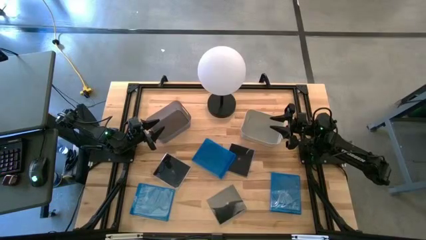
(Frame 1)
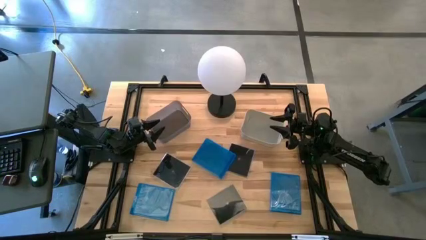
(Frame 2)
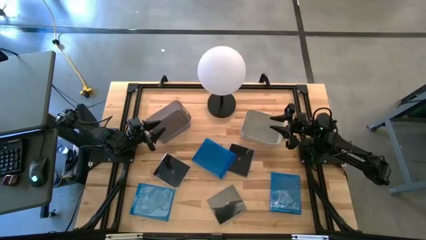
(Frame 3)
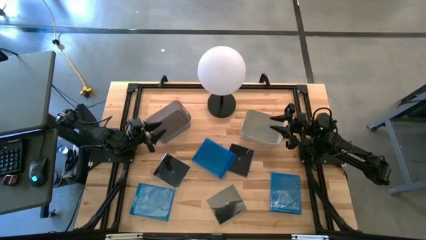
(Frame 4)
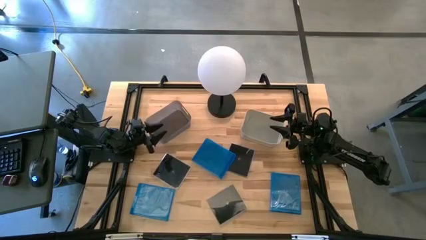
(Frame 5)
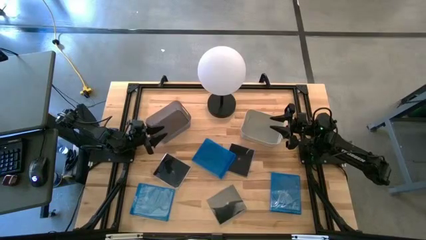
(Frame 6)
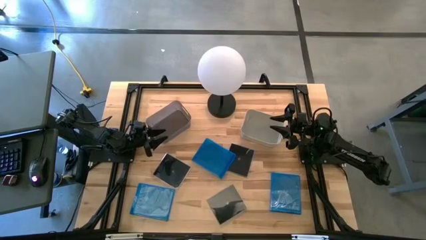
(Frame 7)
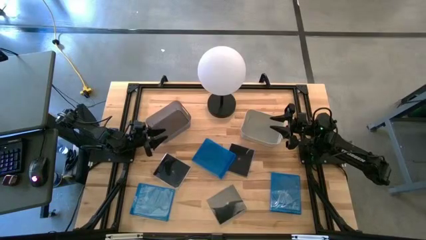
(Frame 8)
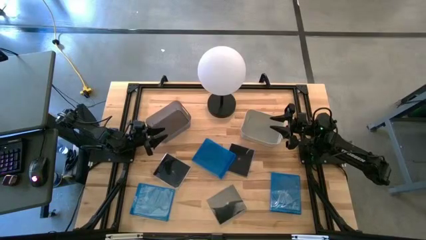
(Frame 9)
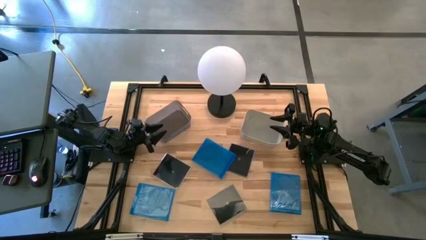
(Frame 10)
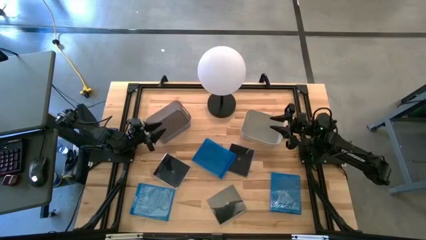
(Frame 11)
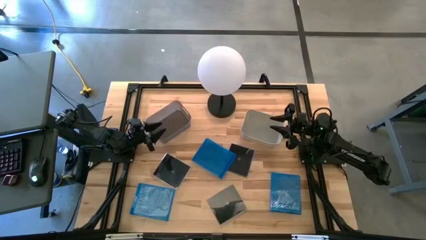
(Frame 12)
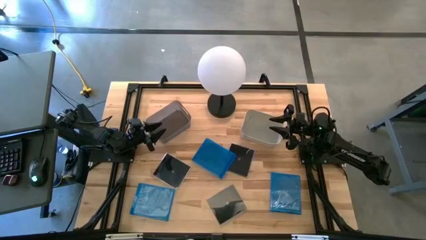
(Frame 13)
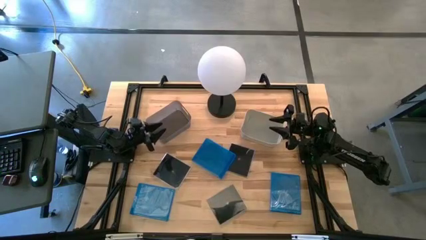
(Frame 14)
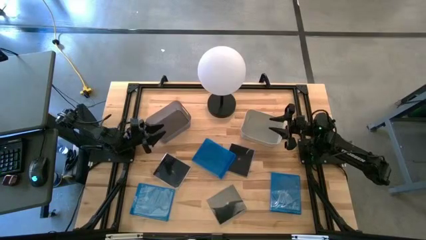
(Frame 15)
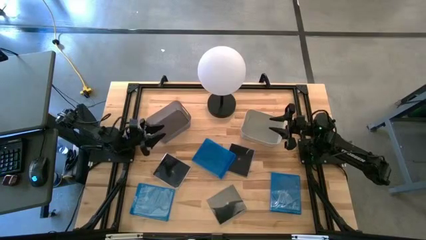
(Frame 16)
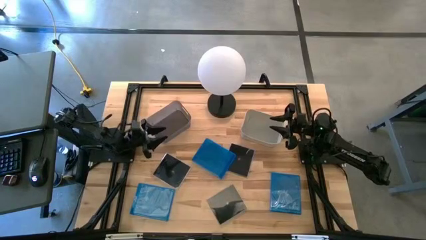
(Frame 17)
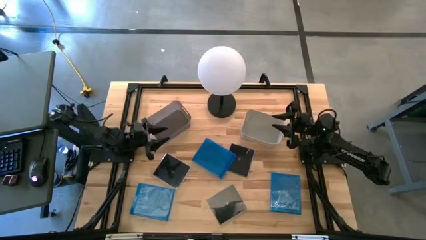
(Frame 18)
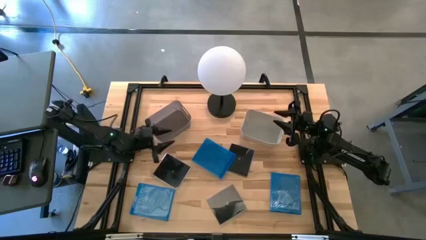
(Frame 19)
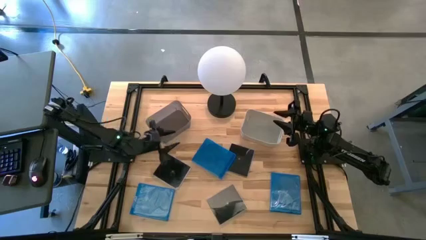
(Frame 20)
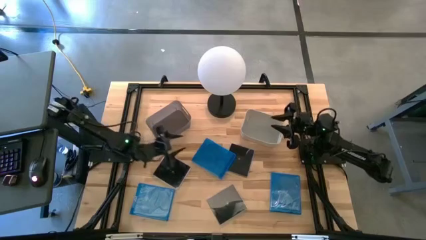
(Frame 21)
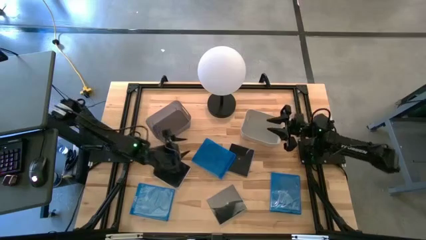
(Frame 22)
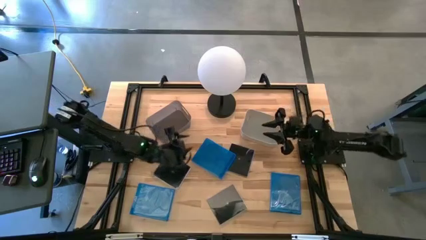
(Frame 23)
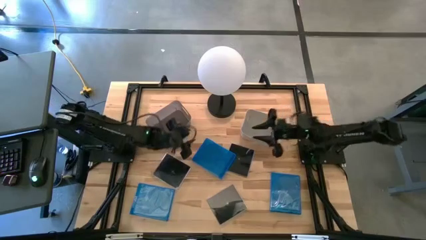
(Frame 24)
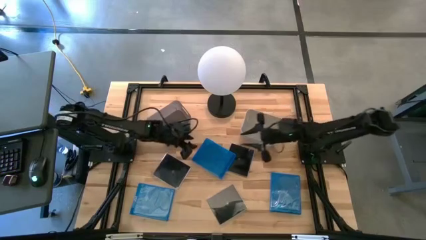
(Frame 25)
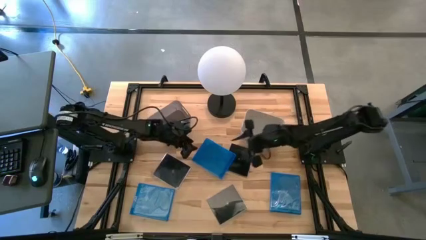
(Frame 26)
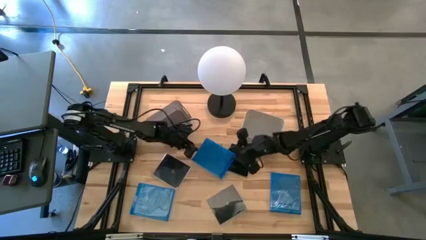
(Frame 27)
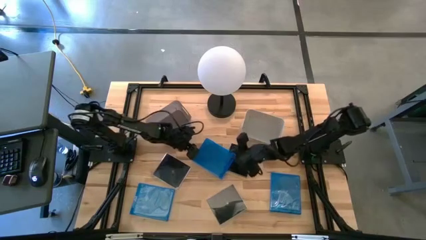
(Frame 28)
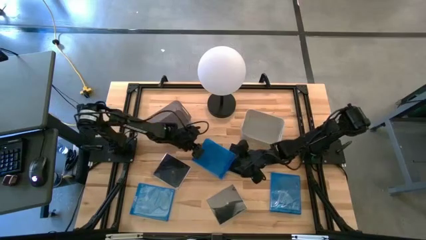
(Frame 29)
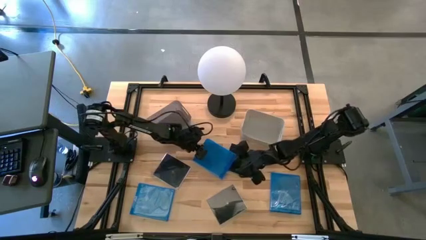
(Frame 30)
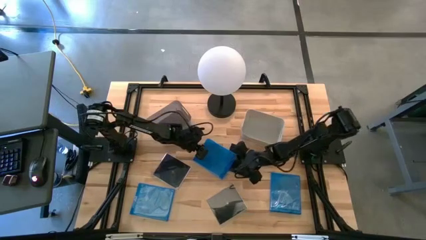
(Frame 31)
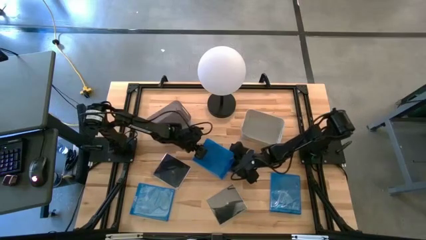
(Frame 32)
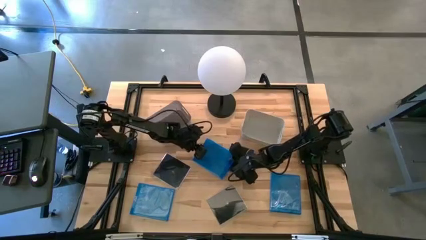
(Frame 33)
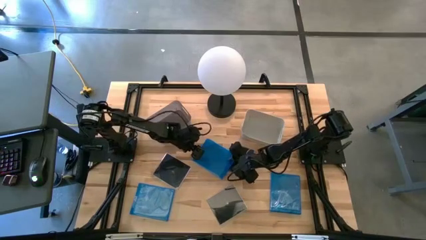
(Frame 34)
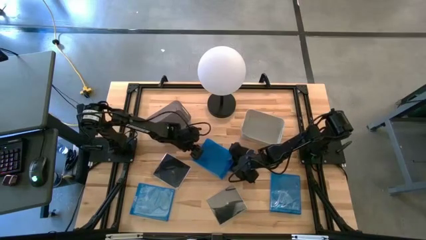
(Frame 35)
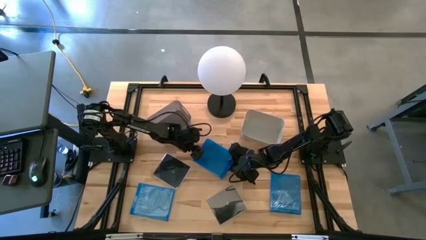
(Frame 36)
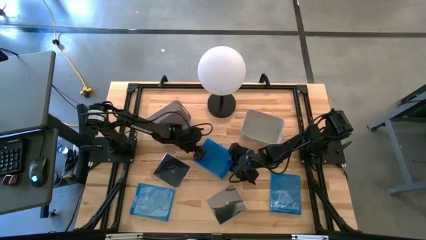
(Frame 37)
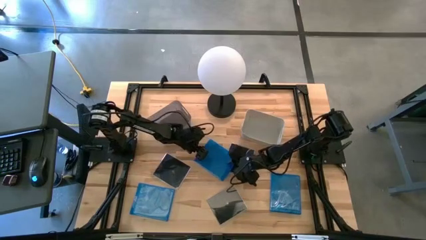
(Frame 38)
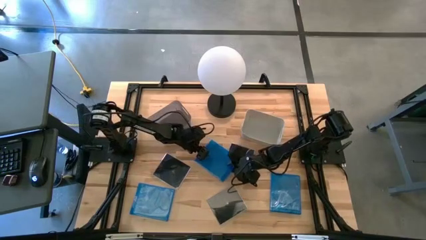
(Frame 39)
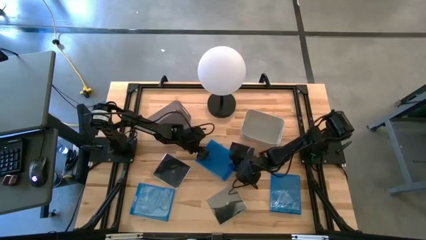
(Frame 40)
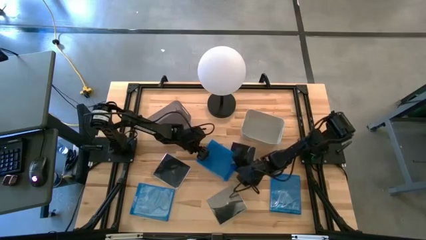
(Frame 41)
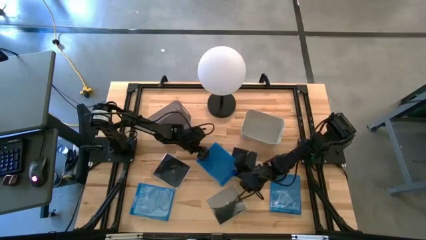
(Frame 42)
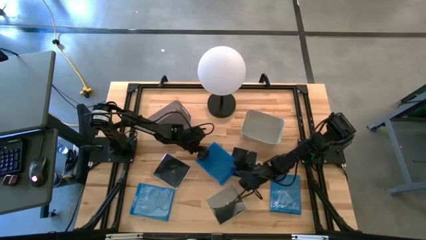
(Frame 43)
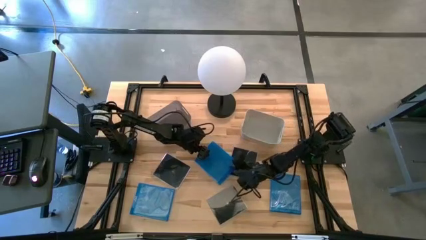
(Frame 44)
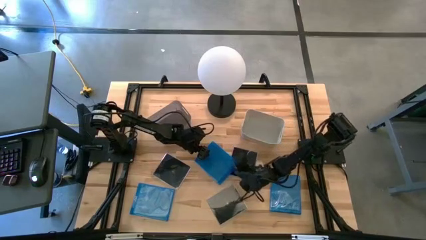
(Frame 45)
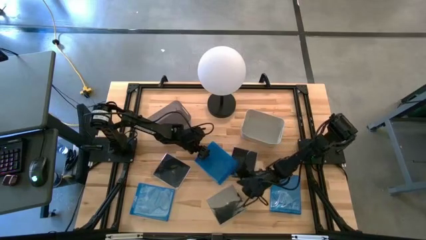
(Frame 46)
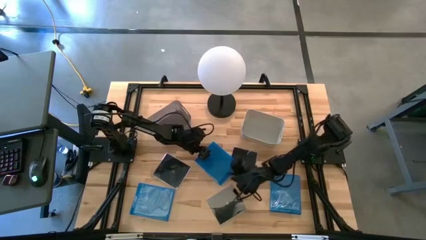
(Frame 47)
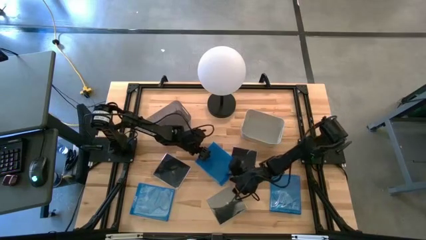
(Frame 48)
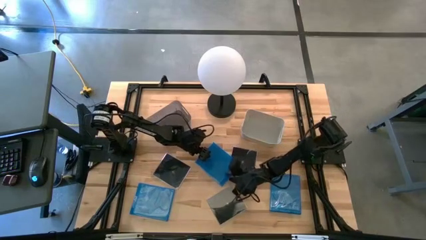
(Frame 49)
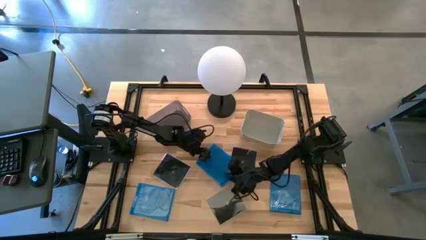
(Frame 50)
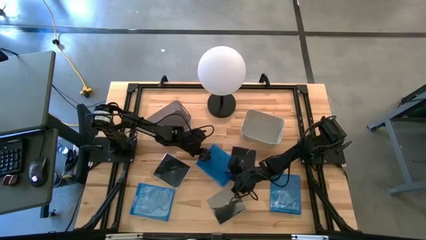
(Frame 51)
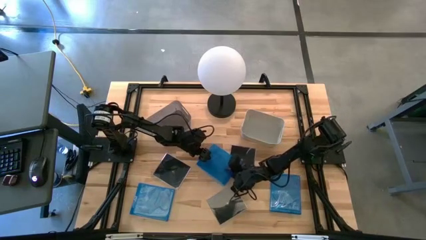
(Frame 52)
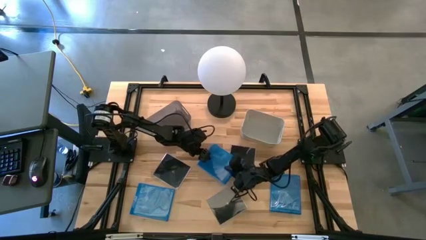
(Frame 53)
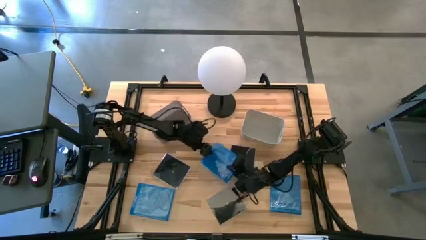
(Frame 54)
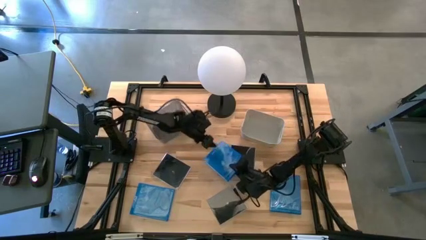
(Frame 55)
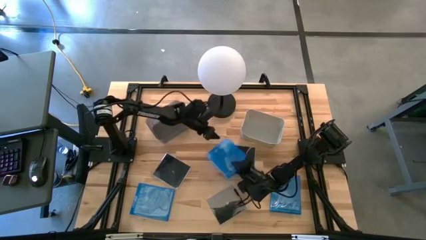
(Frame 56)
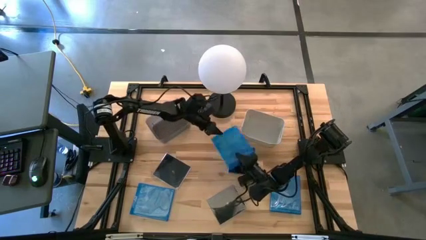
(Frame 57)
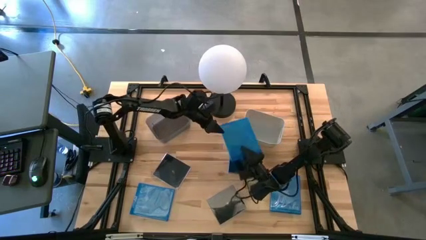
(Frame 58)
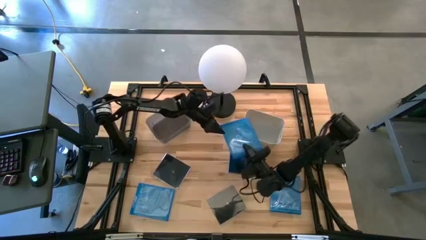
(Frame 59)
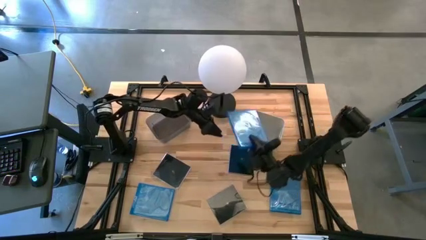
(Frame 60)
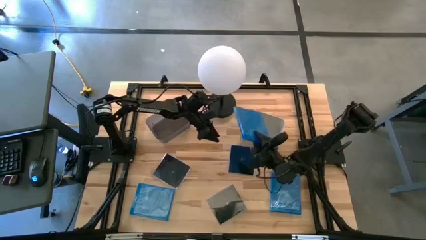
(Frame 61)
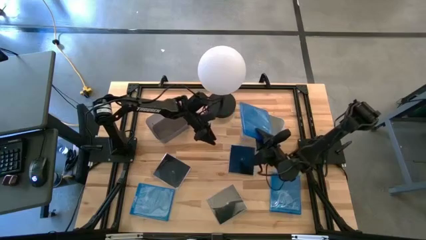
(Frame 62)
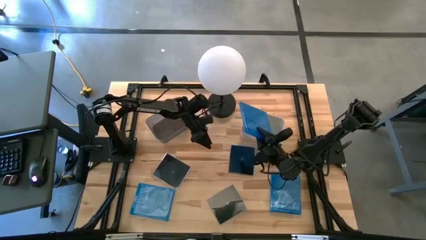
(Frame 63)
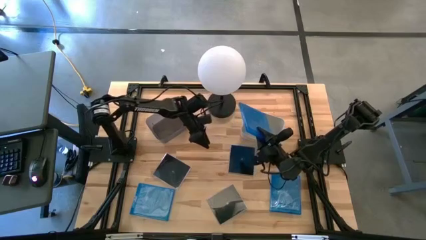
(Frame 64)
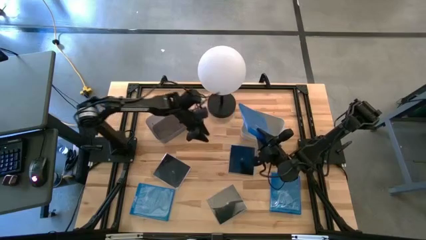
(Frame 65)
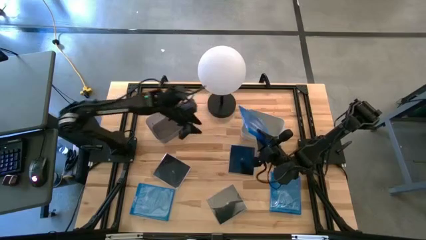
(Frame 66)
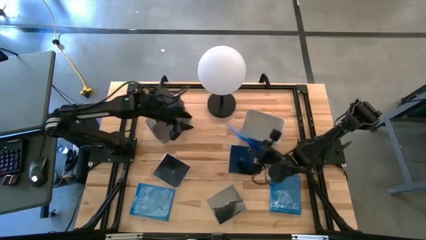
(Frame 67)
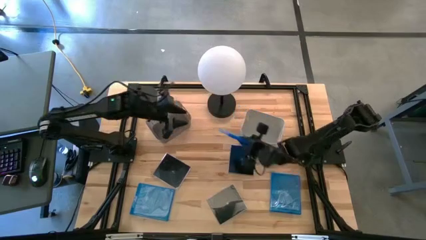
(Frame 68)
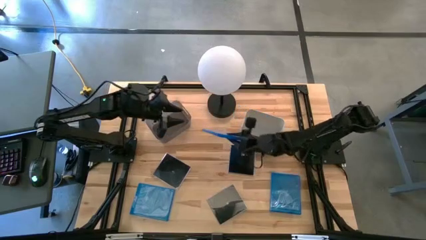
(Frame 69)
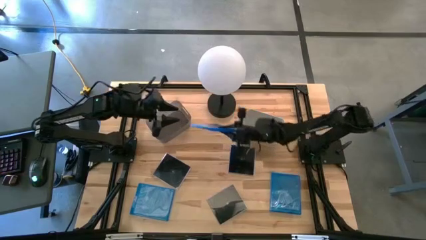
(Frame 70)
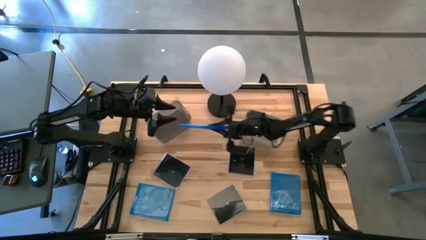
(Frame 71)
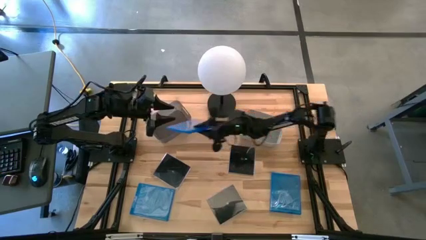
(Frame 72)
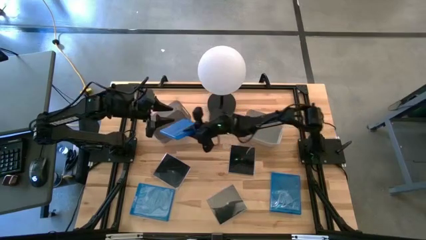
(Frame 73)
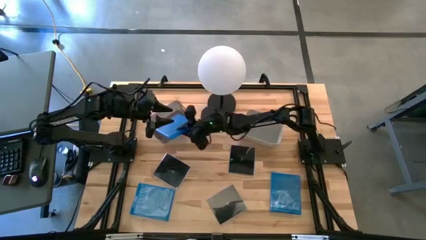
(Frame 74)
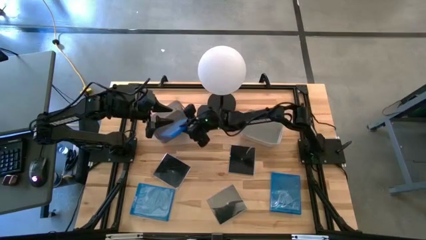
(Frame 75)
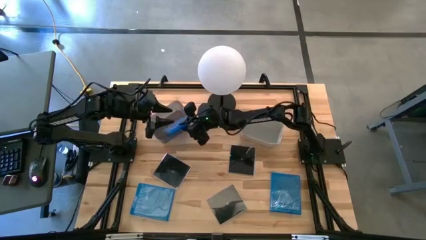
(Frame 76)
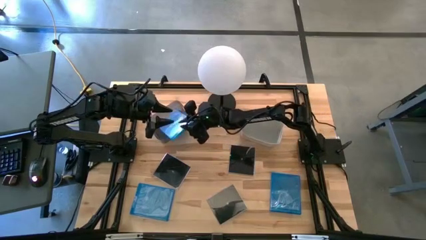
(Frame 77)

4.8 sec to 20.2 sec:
Task: Pick & place jewel cases by type
Put the top blue CD case into the black bin
